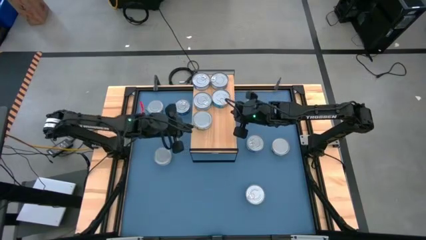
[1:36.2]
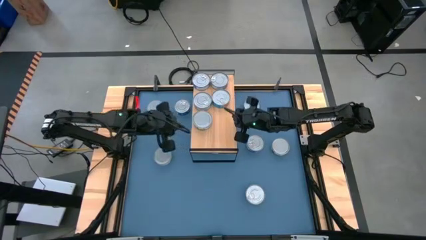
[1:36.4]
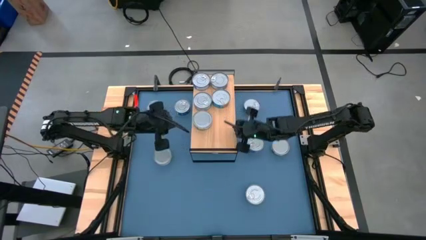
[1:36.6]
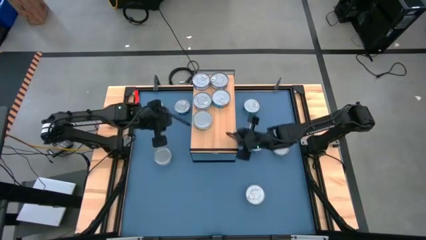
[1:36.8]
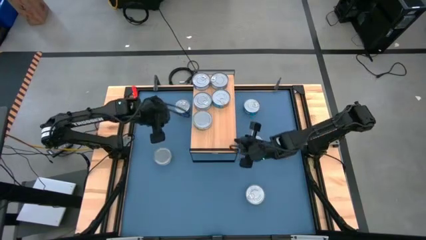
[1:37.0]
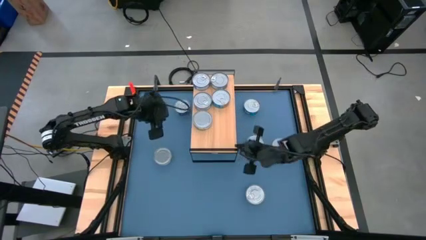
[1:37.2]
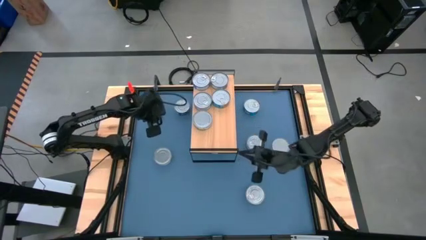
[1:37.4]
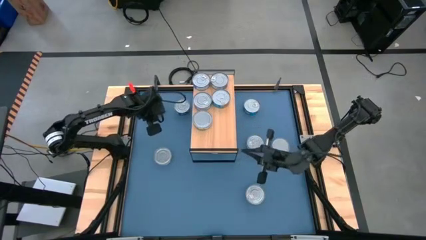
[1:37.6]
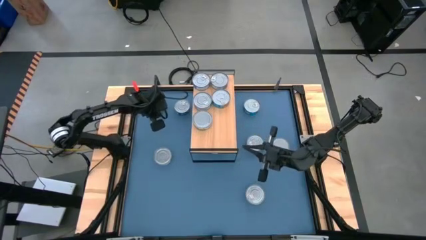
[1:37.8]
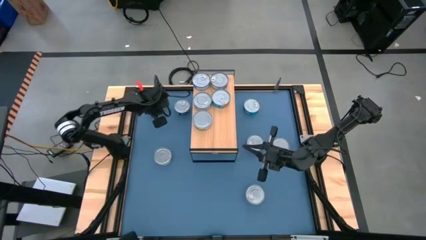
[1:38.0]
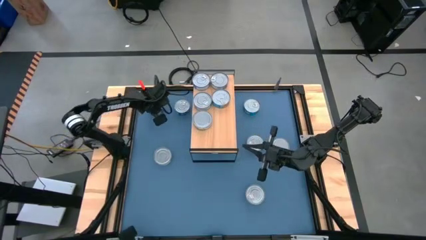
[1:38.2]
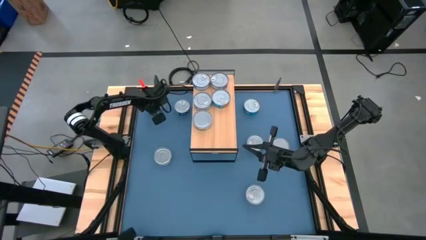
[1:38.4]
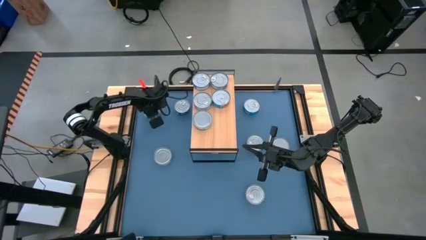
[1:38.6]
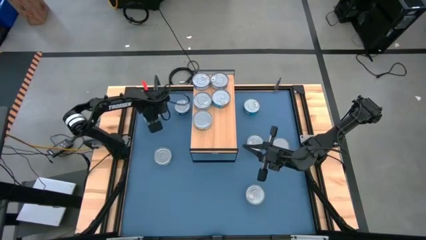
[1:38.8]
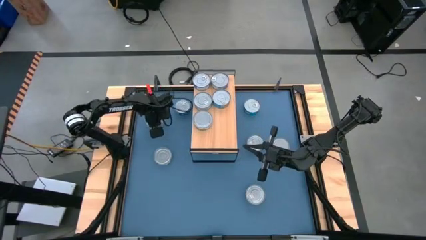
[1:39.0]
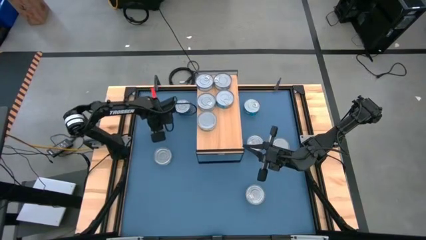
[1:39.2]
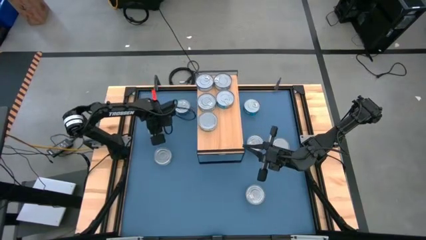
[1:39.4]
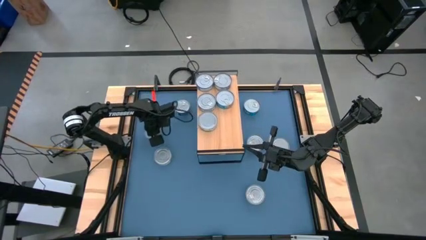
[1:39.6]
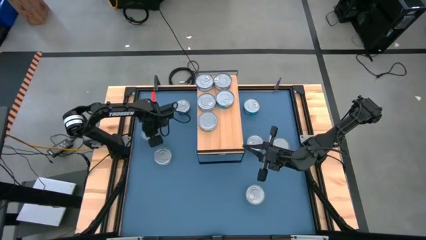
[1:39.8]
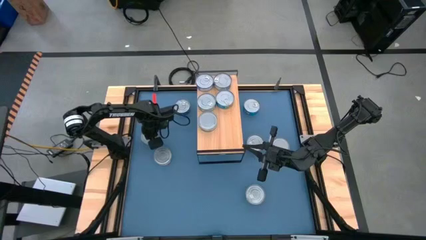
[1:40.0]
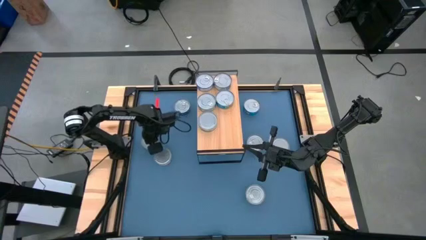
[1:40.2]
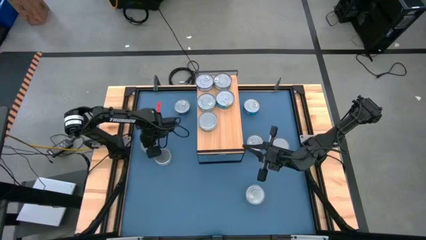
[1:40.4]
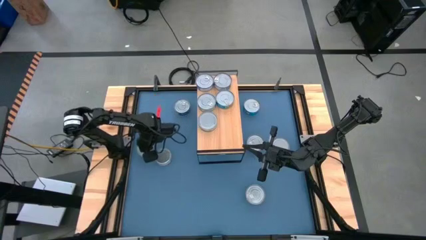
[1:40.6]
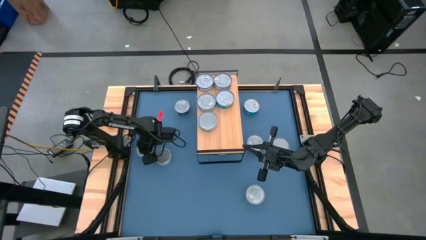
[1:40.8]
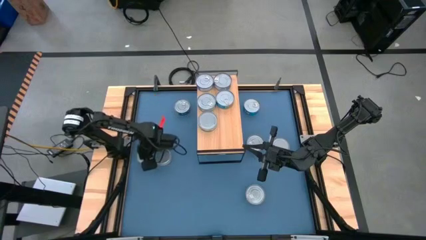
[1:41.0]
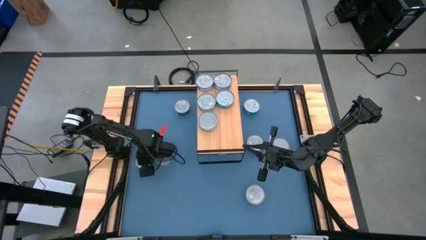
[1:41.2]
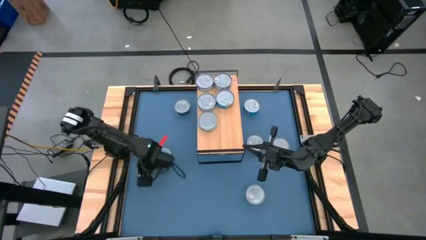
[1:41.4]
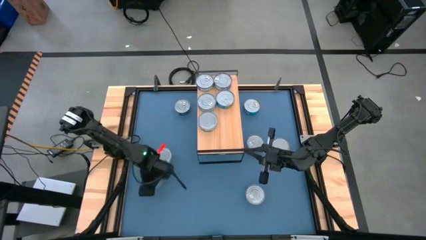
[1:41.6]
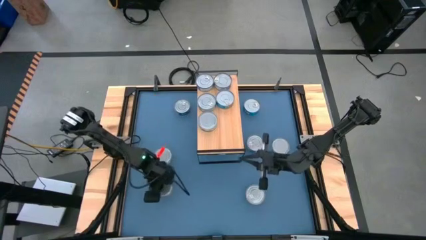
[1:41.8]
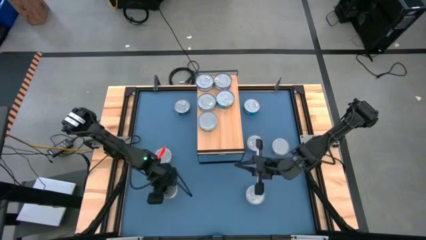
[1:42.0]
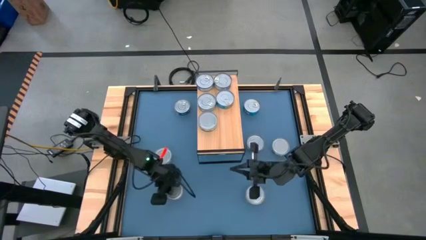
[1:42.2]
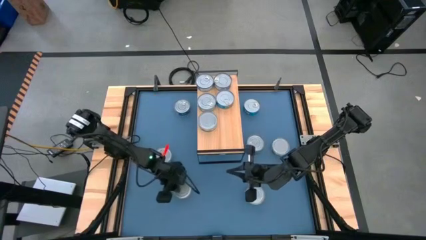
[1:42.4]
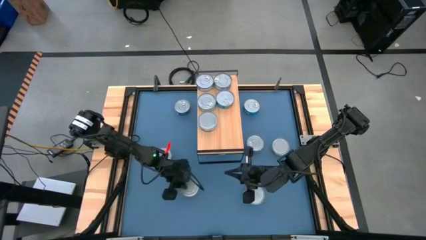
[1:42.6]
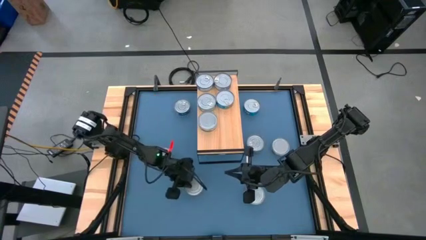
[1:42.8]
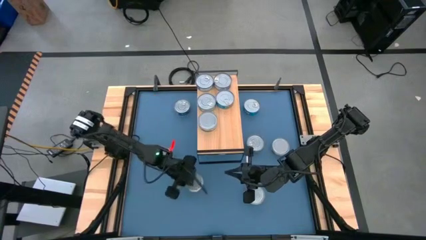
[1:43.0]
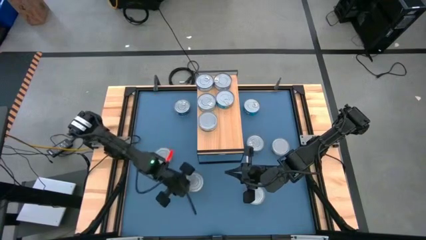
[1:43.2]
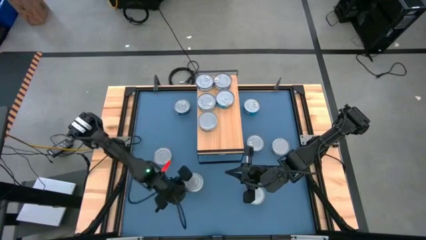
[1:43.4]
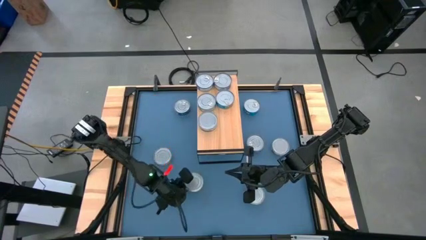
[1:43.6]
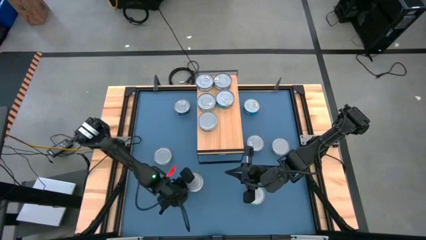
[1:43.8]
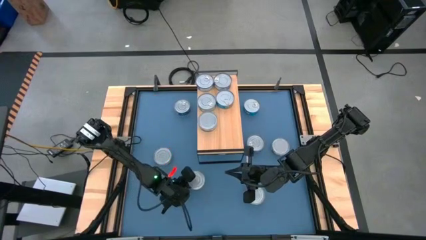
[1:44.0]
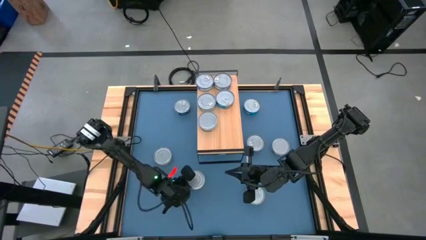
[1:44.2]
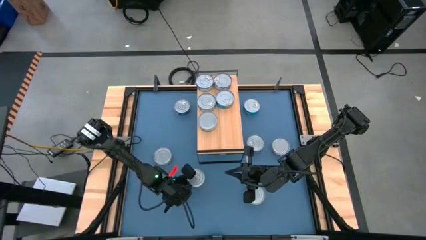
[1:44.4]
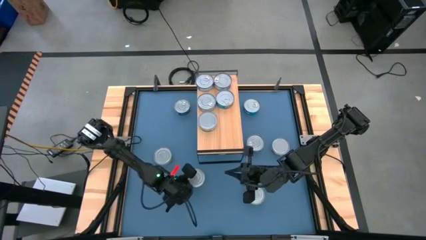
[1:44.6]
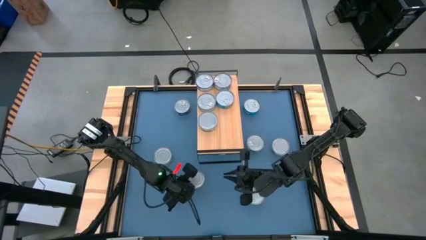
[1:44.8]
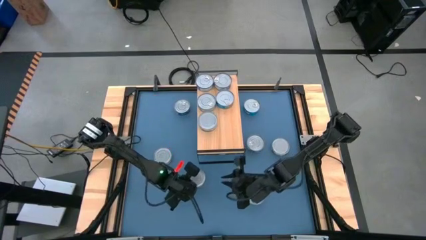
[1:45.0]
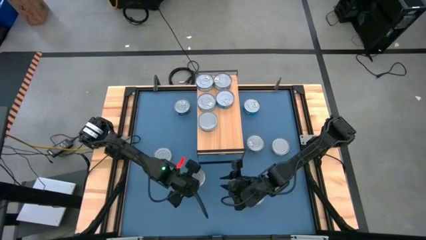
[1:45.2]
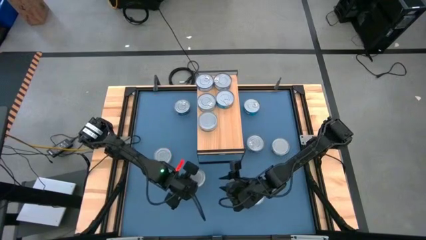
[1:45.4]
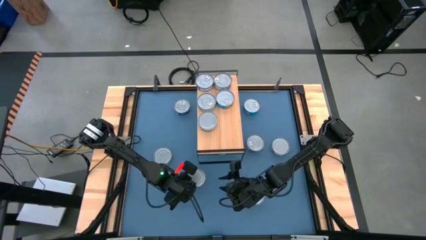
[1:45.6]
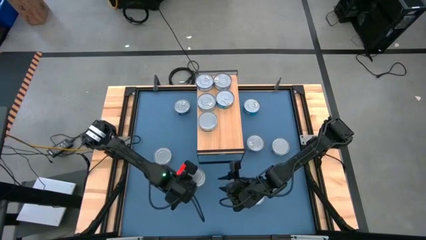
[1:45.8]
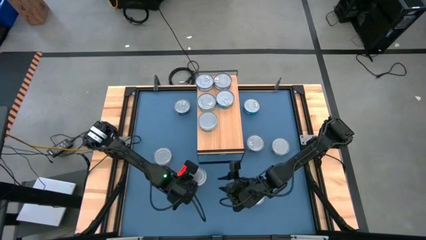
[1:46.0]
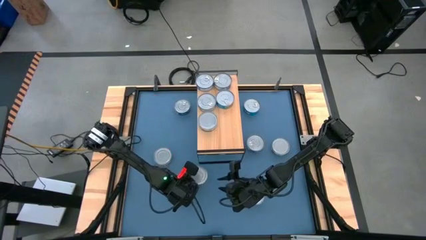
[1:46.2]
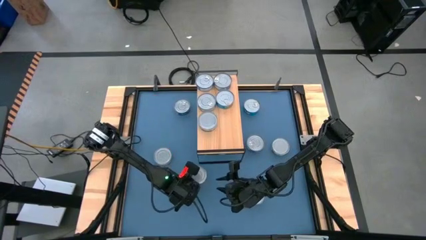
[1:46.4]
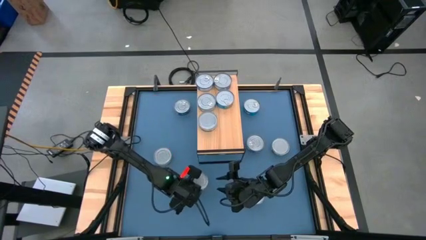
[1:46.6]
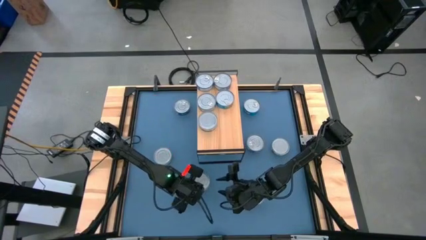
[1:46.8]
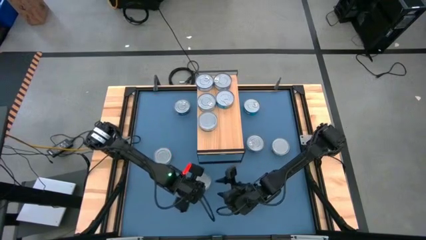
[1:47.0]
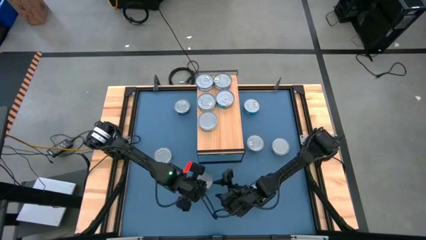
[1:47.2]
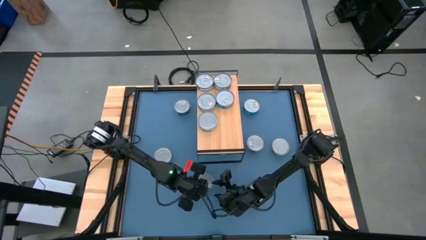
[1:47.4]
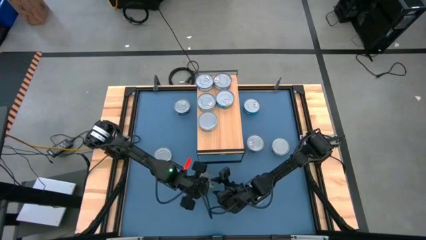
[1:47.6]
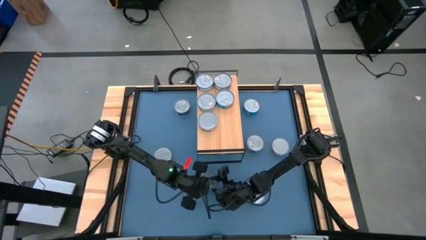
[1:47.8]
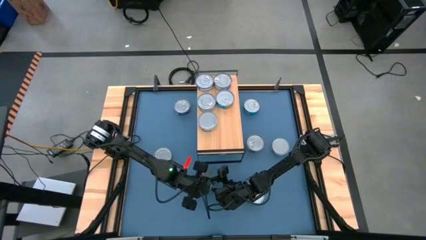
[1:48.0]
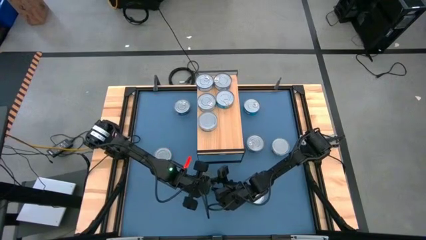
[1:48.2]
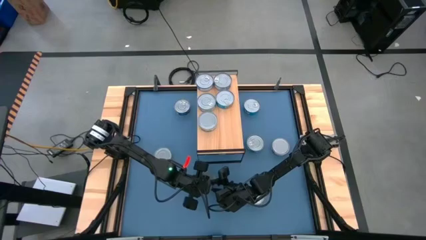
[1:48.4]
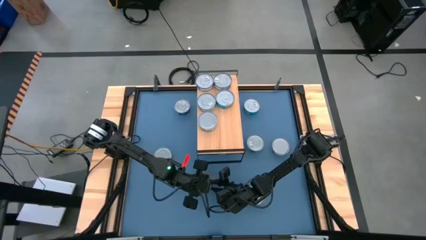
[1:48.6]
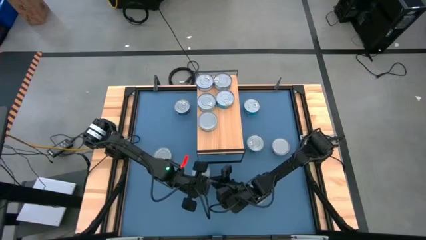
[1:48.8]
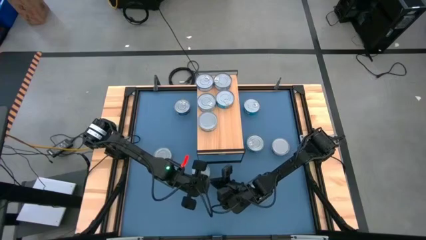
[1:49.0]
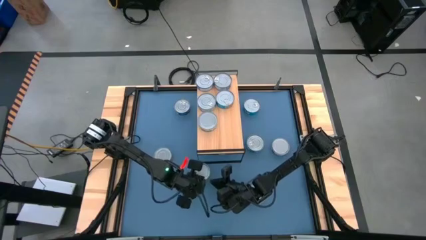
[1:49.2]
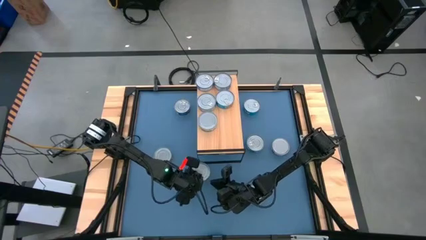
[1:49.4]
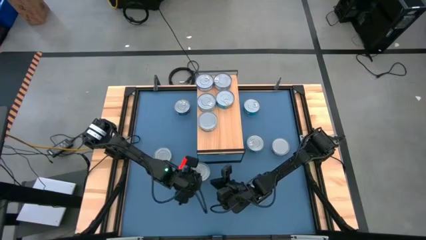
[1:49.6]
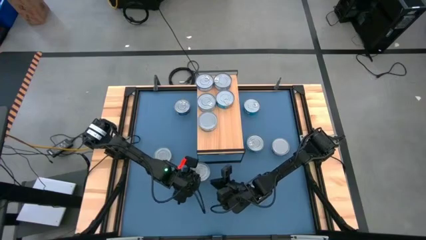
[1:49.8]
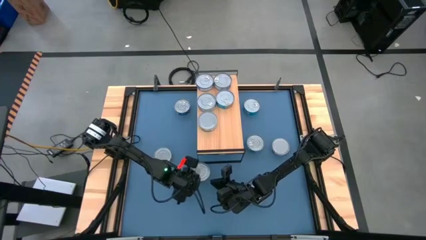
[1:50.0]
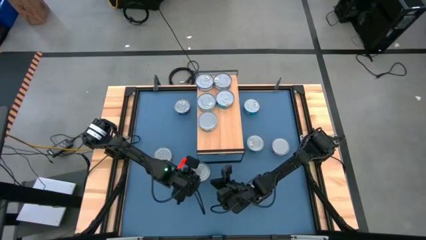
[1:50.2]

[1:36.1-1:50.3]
Task: Stack canned seafood by type on shelf
Put the green tuna can on the shelf
